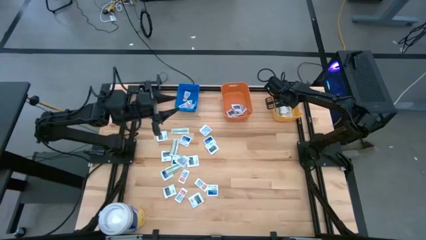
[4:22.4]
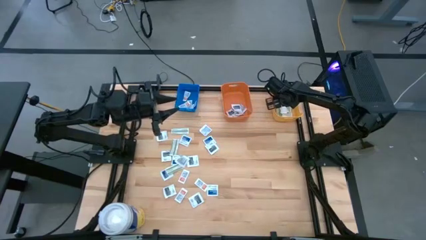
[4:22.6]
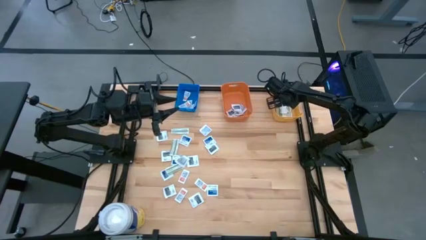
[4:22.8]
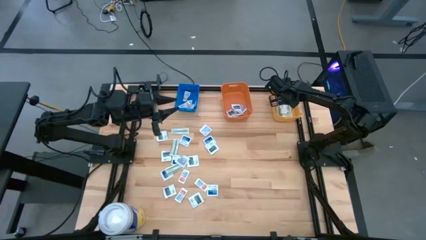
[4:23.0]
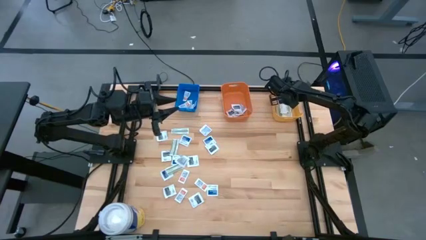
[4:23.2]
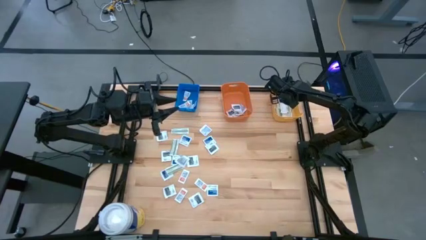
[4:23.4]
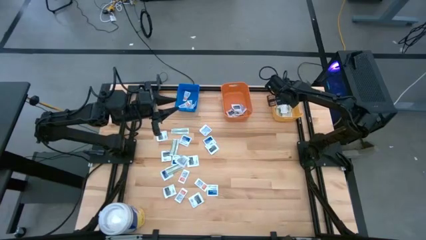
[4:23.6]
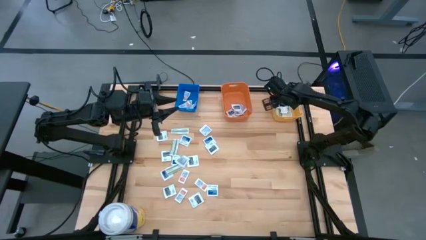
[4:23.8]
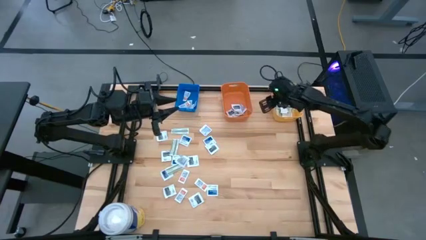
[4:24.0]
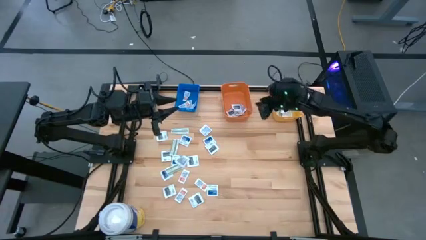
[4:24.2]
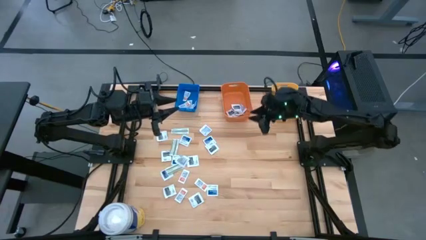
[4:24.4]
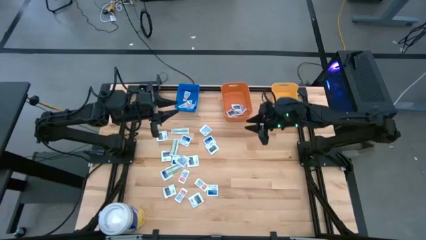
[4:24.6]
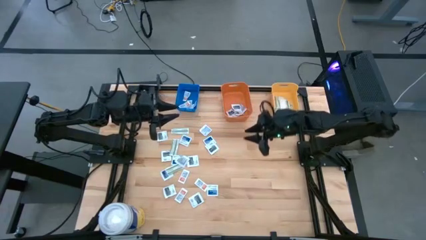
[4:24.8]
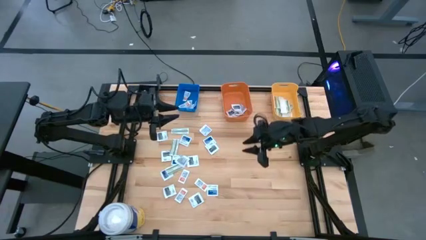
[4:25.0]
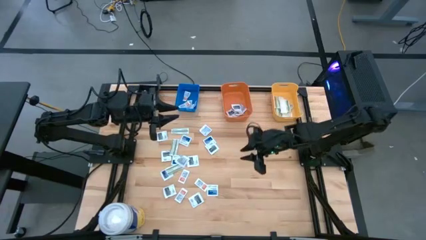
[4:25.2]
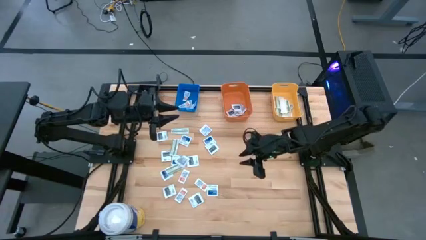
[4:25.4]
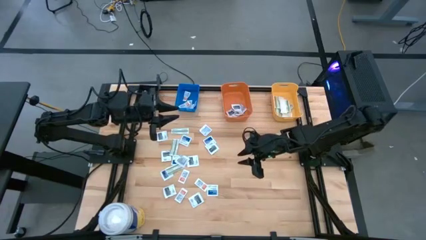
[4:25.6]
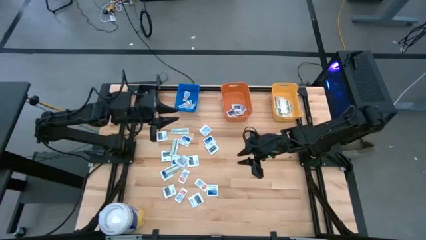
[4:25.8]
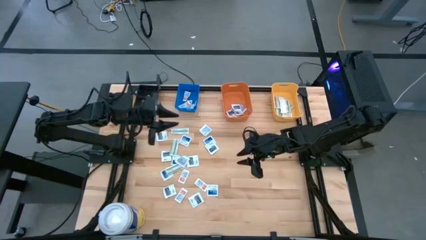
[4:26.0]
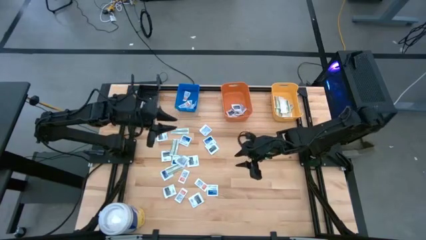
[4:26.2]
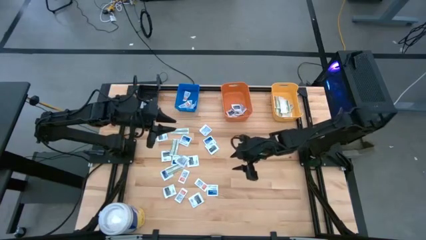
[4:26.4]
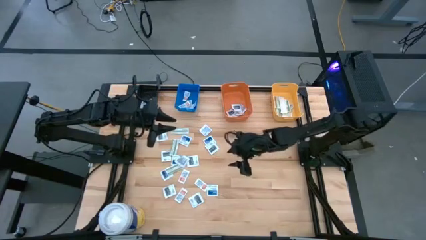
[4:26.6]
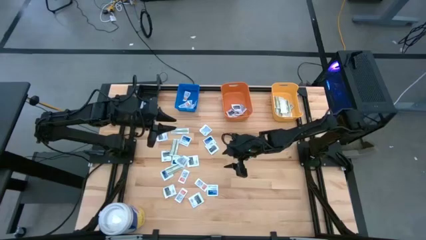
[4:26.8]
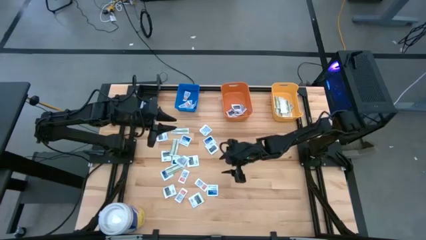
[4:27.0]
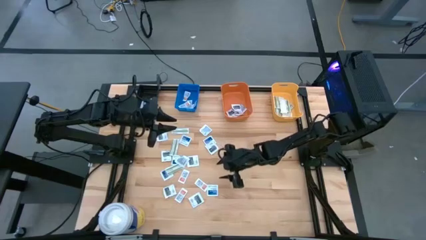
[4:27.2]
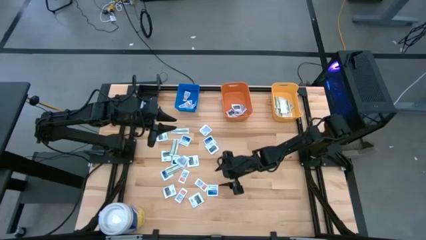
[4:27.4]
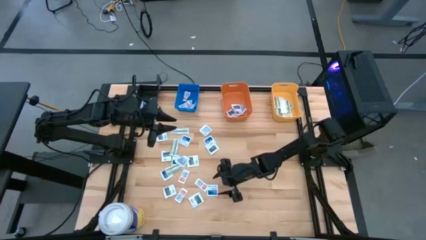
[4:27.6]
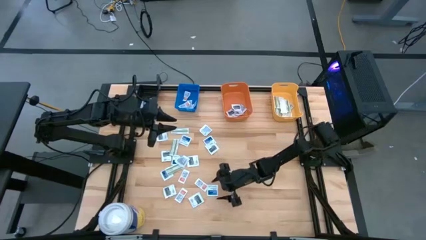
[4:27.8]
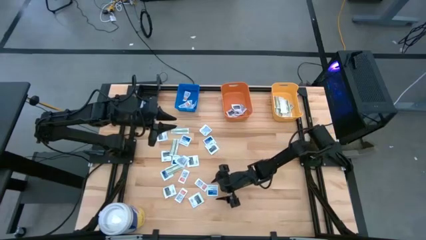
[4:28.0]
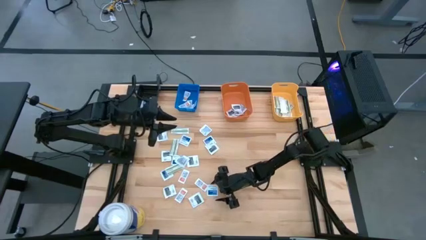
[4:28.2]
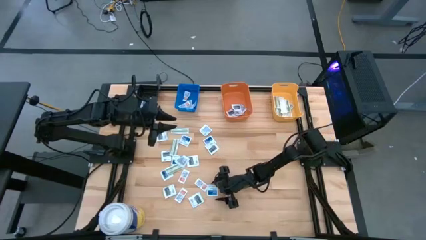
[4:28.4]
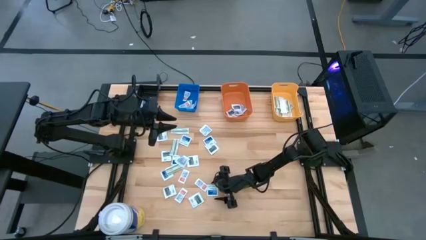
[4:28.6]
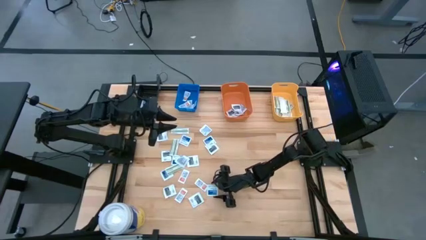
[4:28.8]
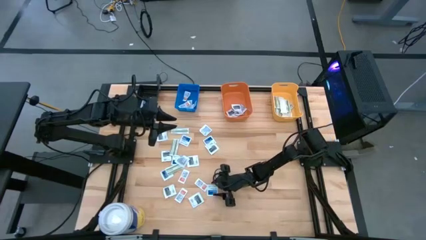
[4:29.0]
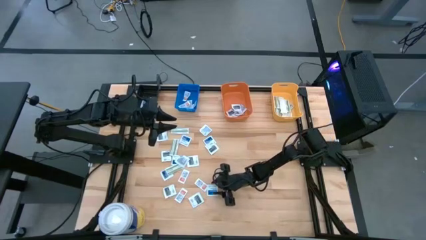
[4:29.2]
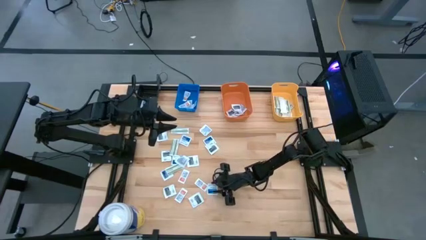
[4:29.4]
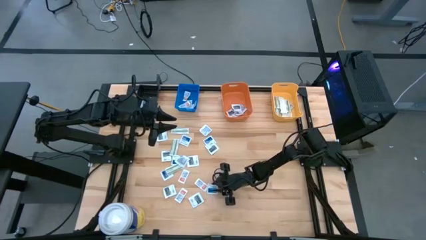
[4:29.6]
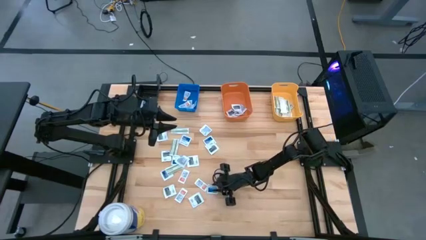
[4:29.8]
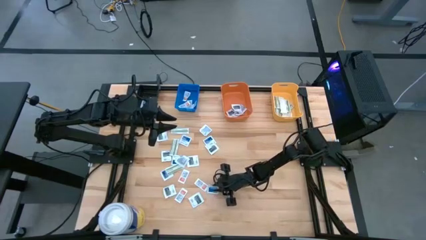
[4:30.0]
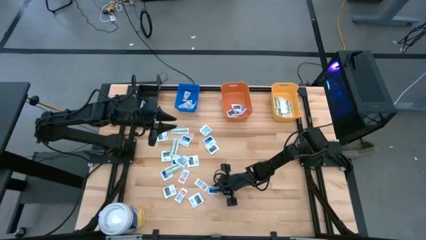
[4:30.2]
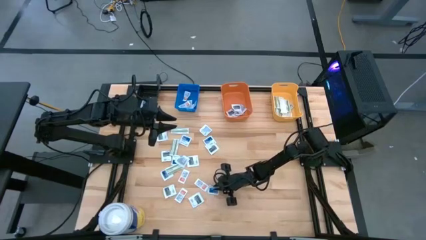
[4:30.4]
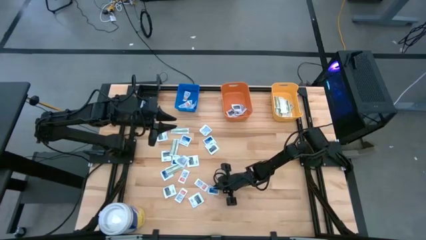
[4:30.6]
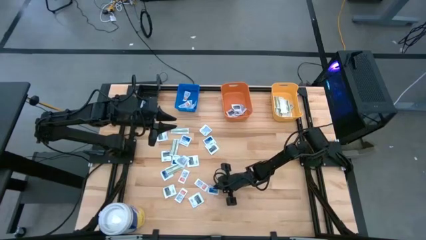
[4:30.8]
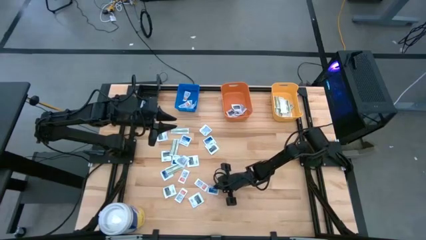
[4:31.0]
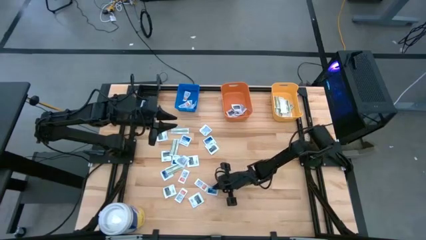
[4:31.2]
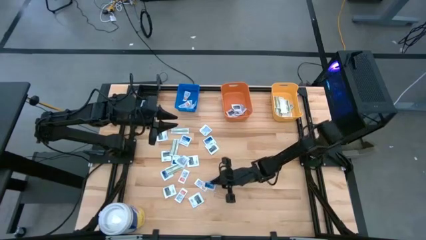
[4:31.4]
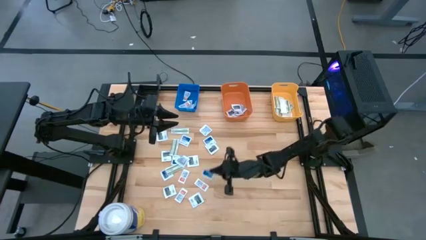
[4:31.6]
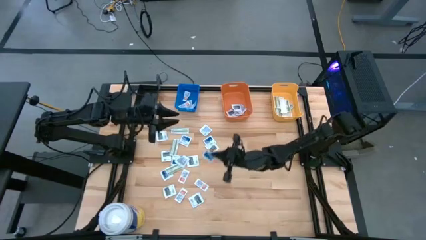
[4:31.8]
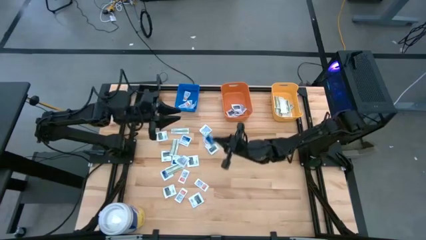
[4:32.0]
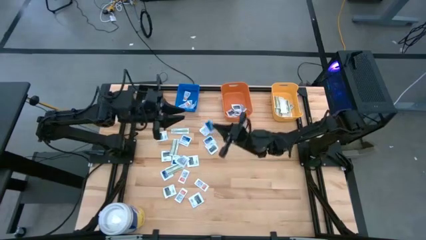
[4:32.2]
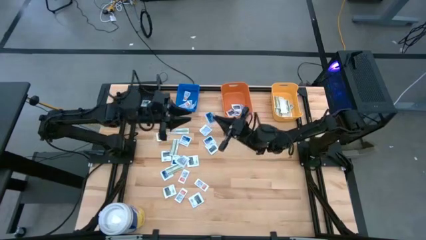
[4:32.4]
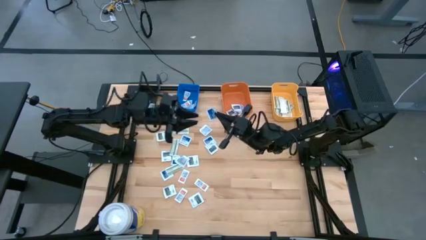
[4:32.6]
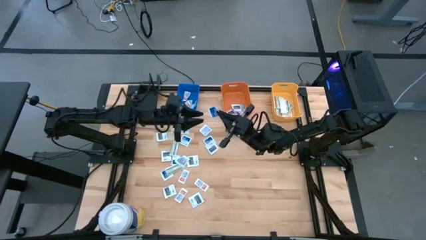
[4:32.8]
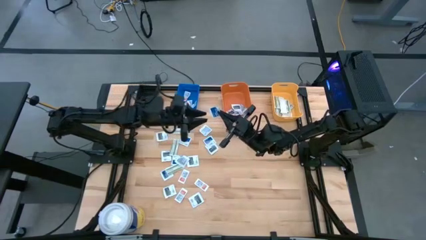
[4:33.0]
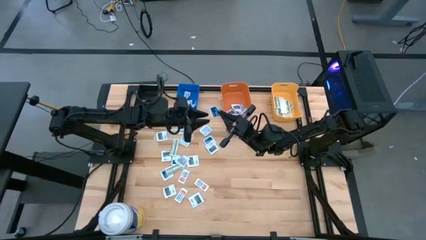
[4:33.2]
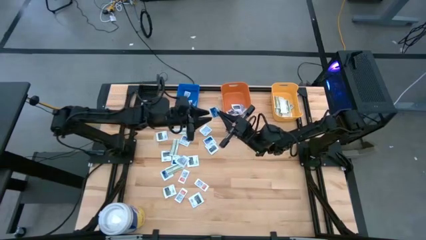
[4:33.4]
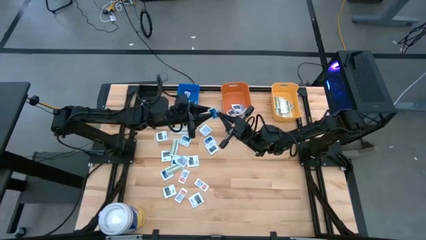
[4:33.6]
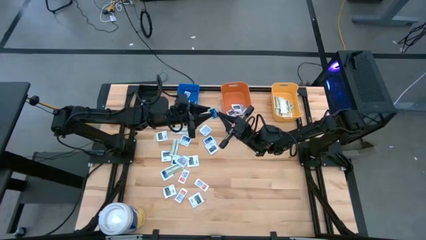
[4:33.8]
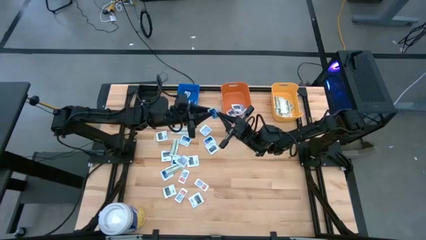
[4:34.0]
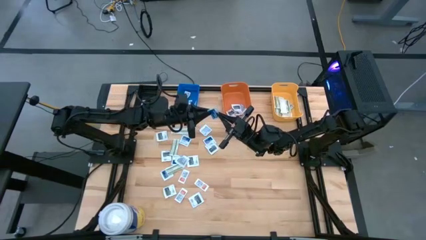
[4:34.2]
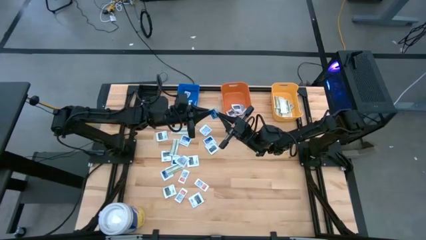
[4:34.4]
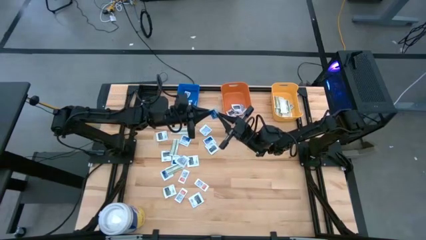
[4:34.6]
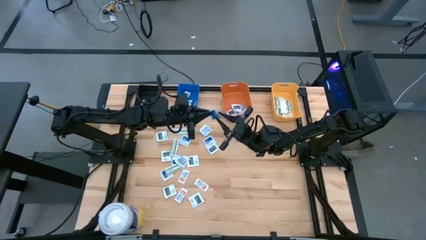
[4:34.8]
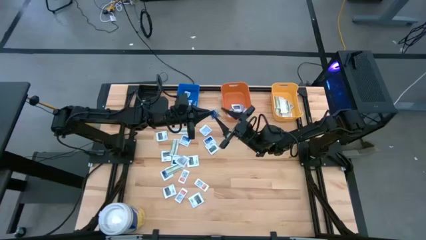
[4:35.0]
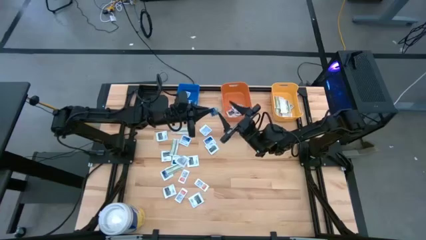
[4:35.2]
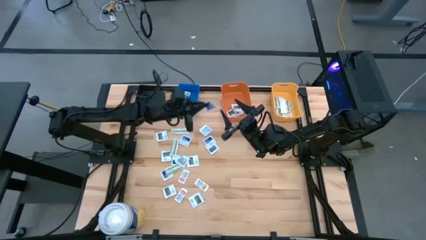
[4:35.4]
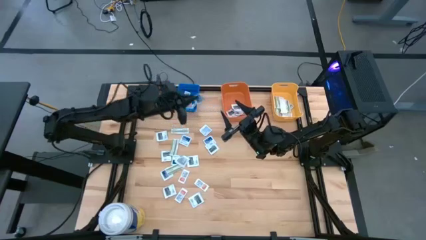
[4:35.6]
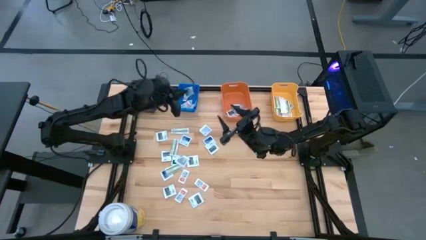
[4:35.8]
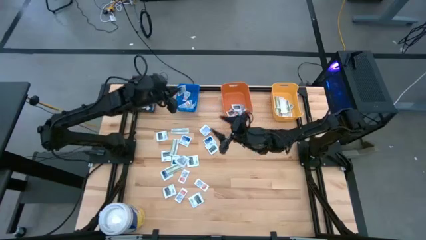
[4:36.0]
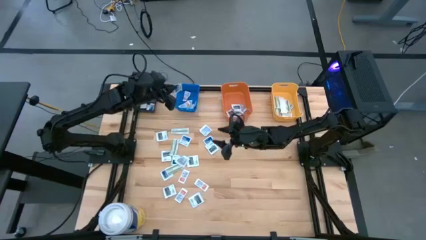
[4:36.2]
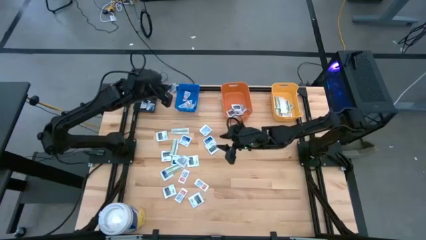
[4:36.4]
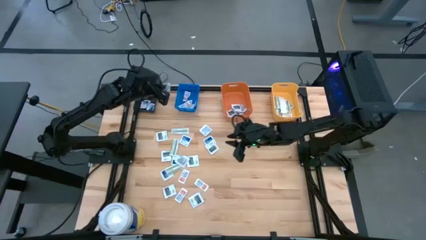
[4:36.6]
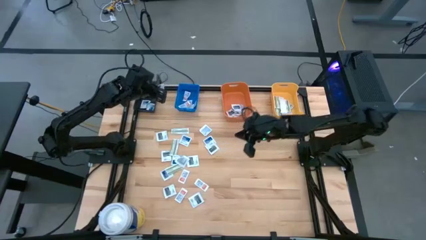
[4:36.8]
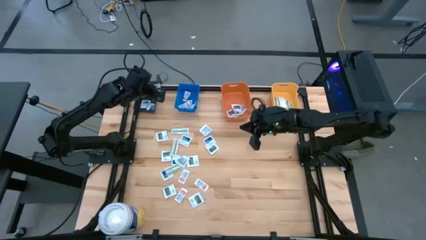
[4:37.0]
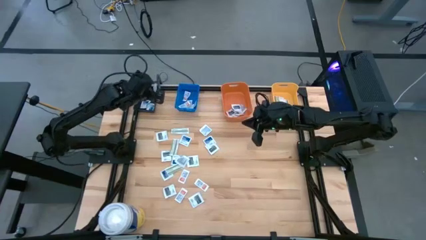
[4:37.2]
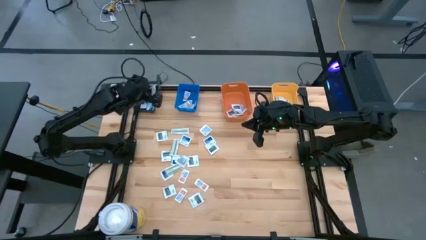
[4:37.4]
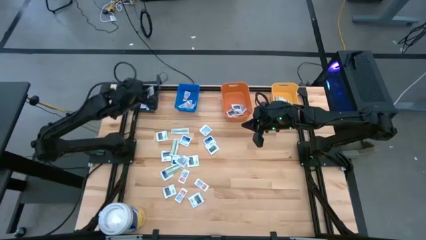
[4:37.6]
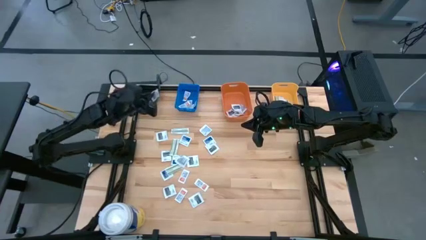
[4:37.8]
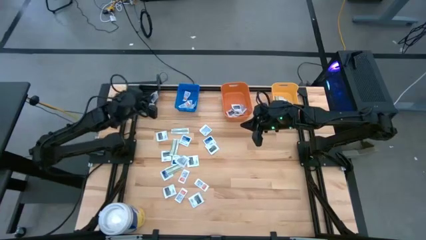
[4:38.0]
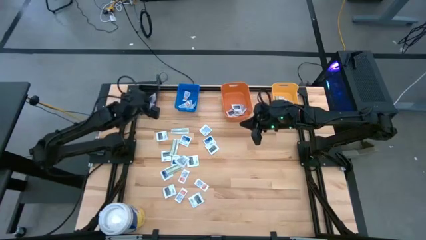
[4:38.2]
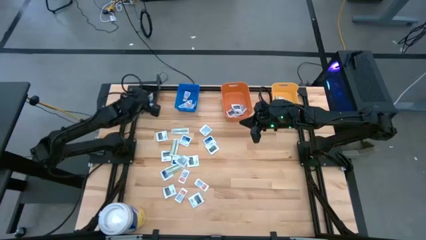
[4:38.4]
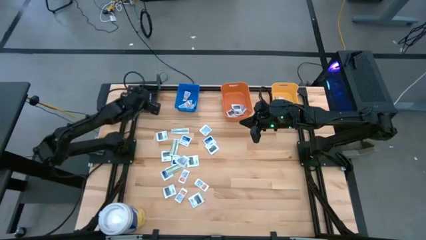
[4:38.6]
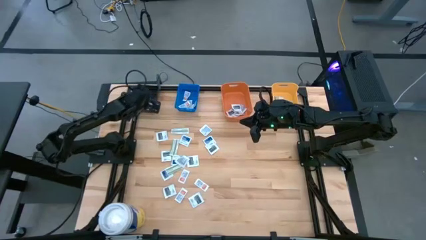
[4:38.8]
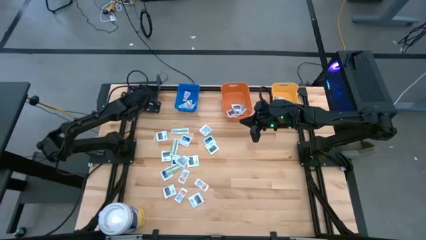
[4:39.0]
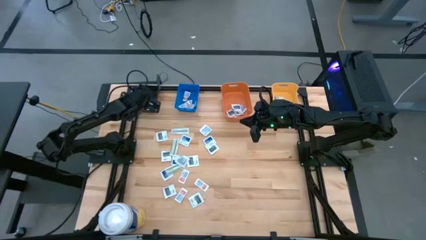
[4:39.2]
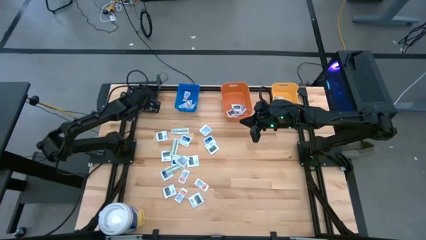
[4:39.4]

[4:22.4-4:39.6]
Task: Pick & Place First Aid Supplies
Put the alcohol pad into the black bin
